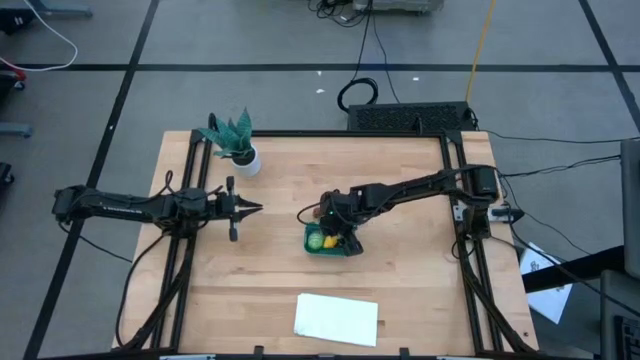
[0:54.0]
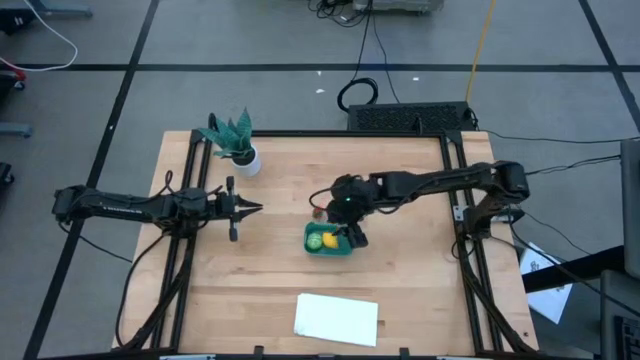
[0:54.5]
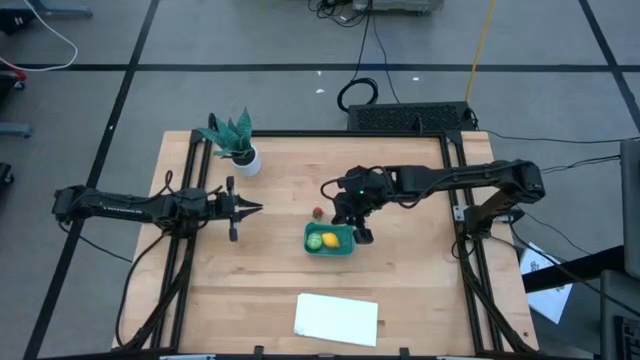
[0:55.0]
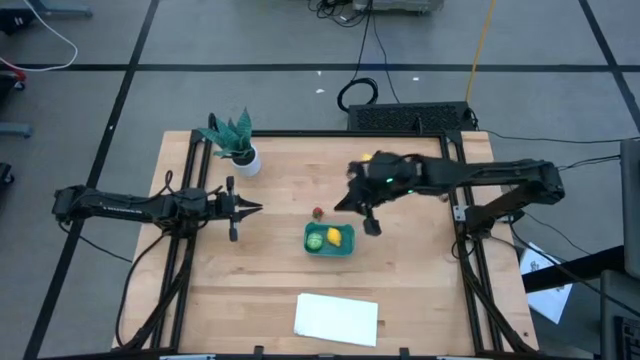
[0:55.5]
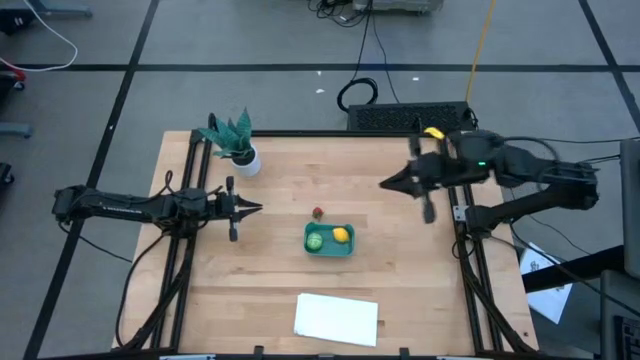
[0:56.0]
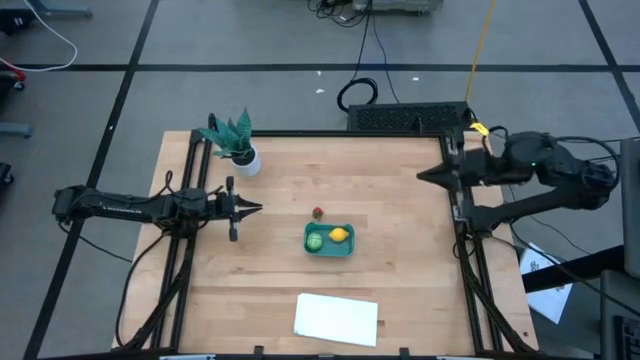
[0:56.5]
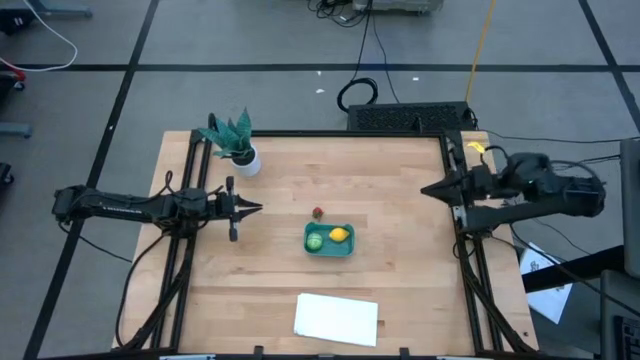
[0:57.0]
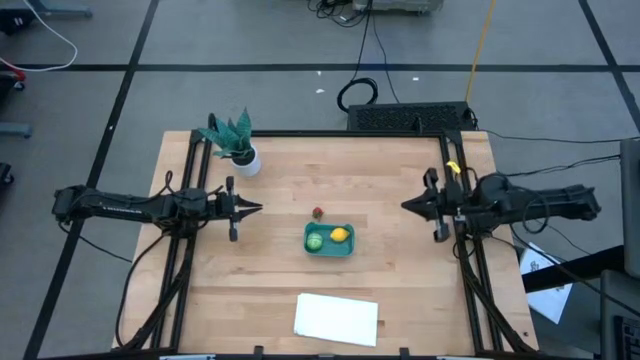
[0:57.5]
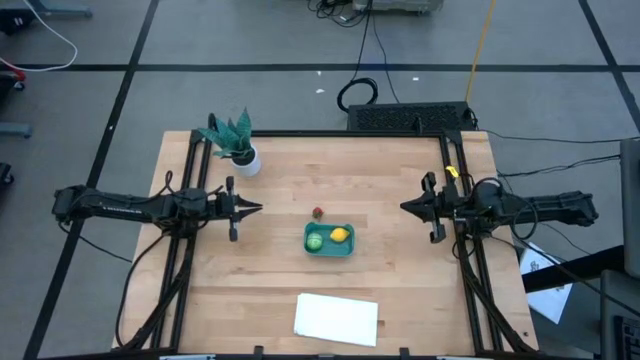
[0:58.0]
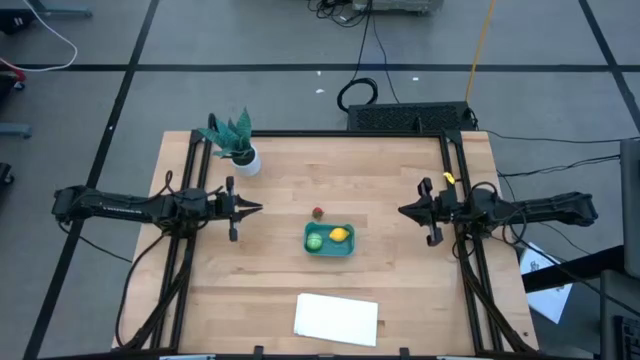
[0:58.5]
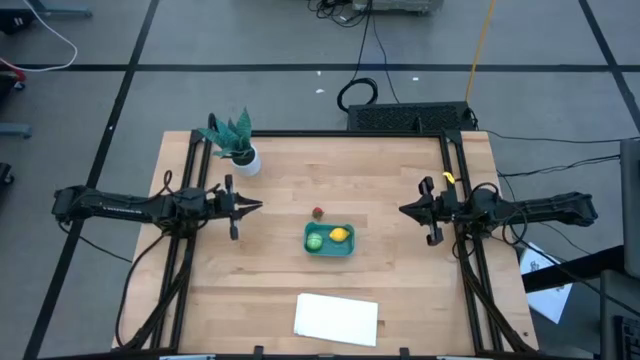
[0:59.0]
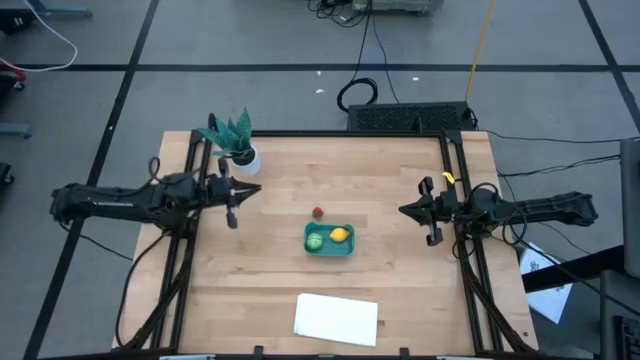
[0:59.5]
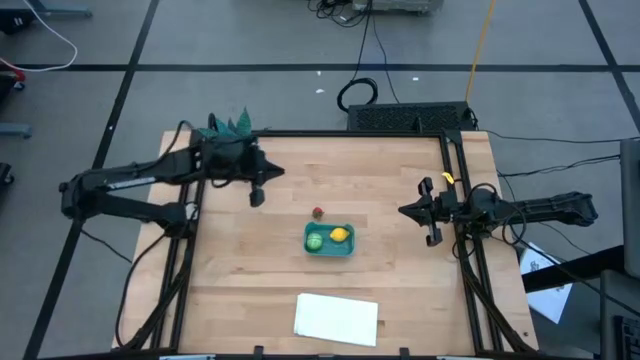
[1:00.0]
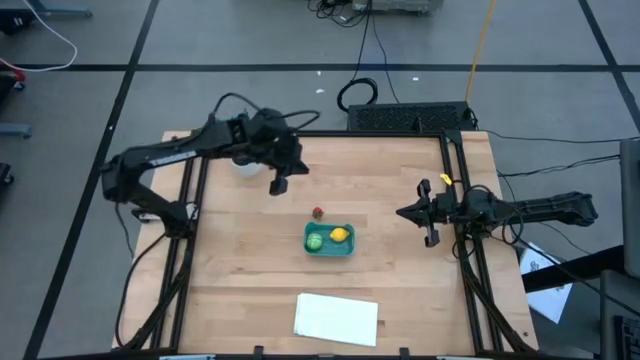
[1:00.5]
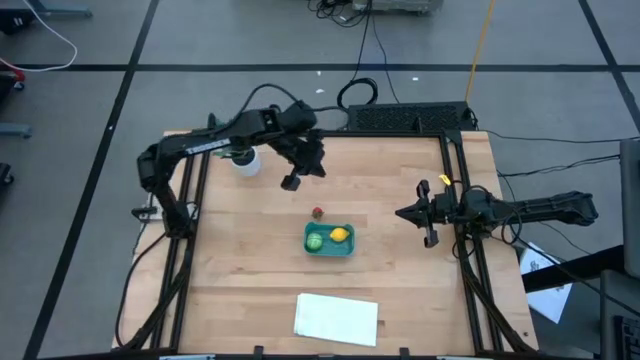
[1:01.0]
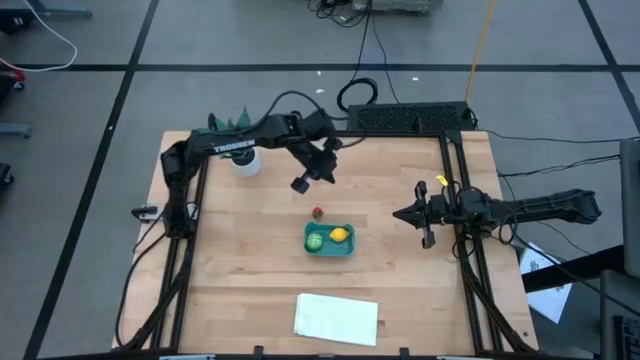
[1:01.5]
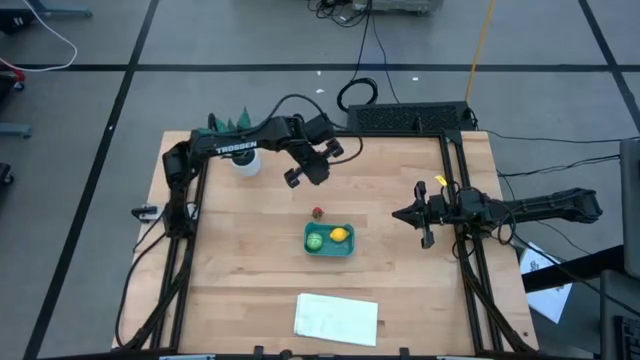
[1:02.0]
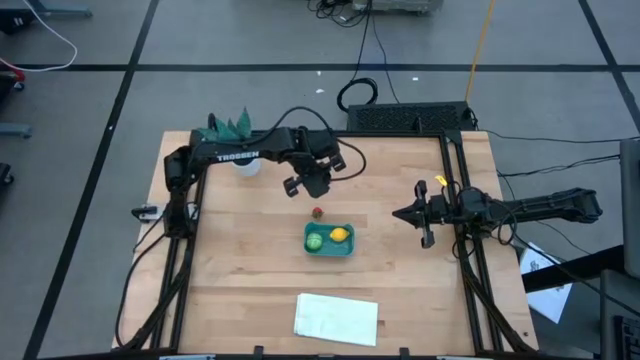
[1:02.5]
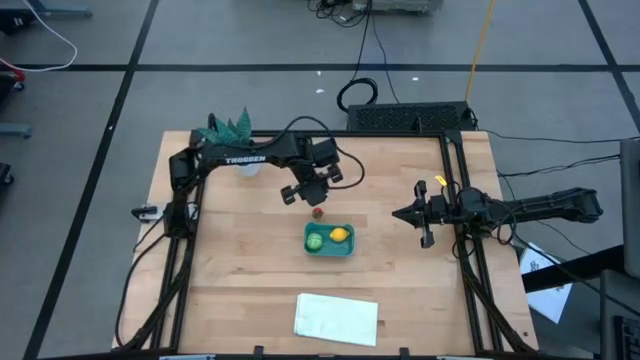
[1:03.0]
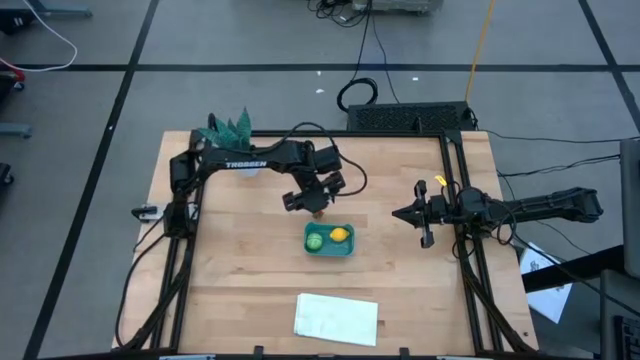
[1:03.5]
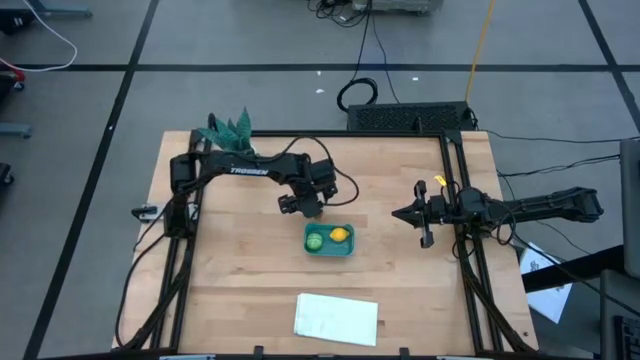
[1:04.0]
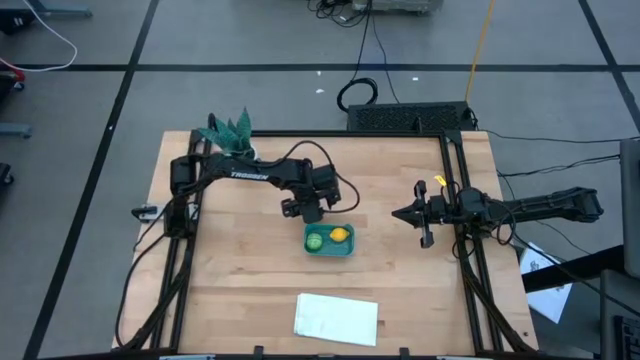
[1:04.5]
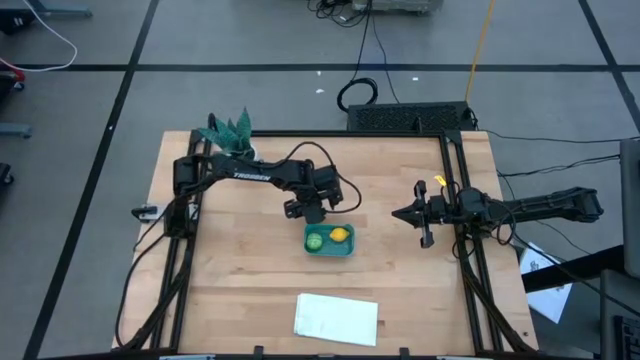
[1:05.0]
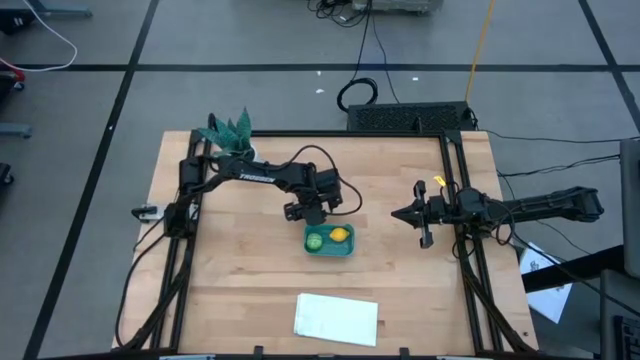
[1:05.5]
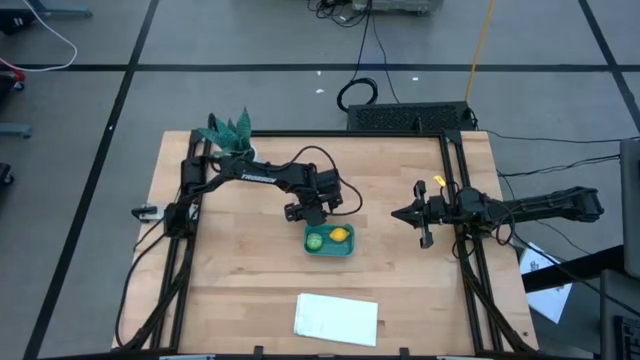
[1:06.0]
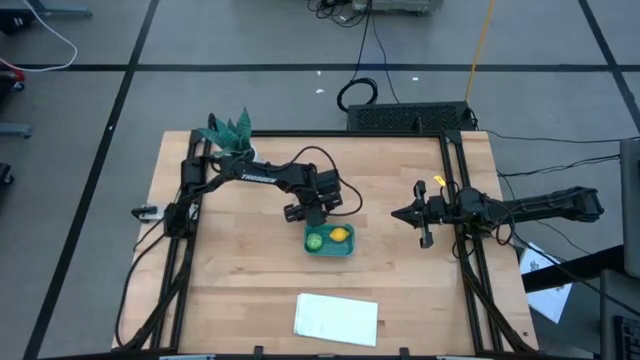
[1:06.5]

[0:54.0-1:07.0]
Task: Pick and placing Produce into tupperware
Put the strawberry into the blue bin
